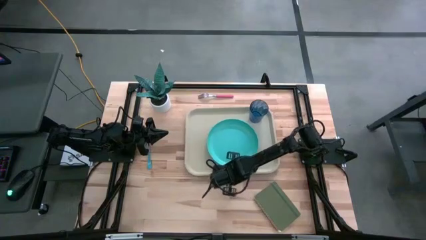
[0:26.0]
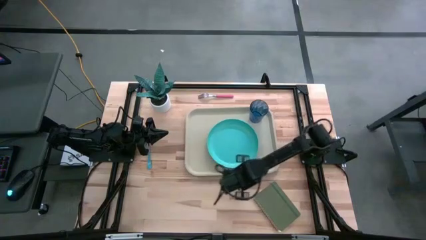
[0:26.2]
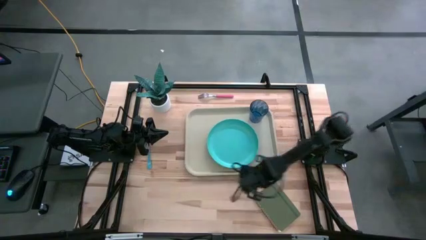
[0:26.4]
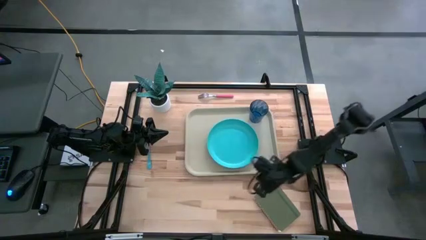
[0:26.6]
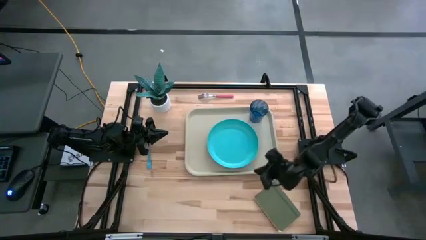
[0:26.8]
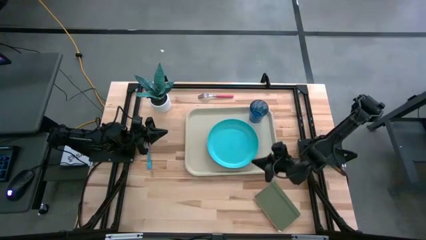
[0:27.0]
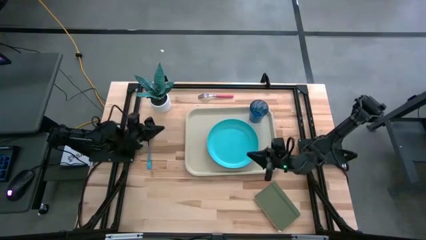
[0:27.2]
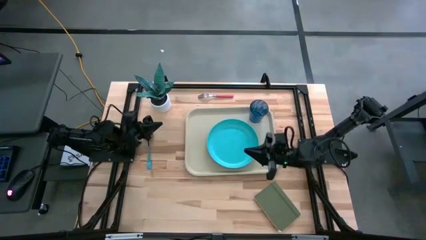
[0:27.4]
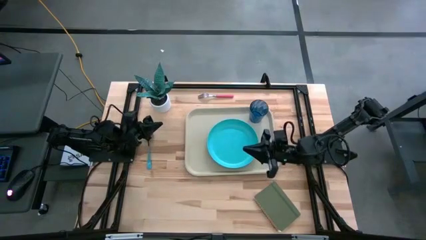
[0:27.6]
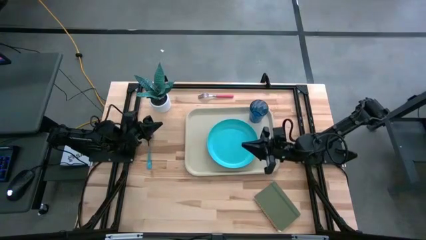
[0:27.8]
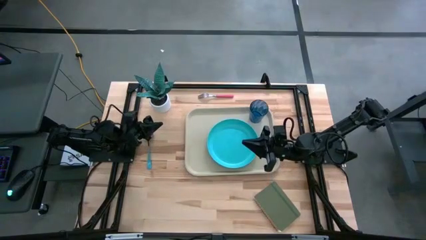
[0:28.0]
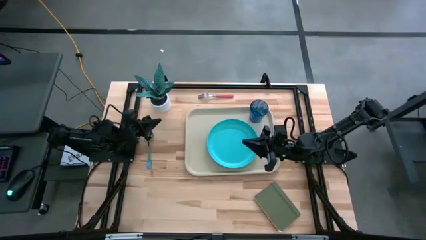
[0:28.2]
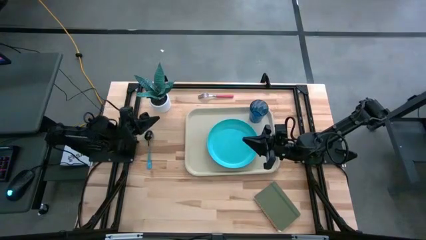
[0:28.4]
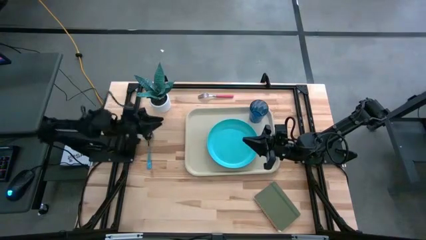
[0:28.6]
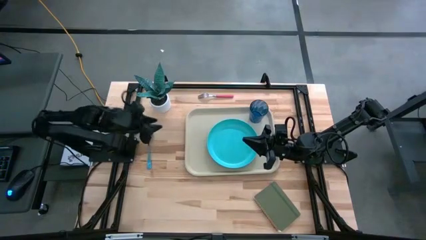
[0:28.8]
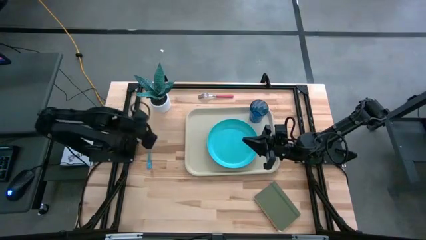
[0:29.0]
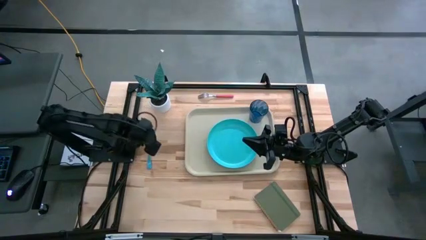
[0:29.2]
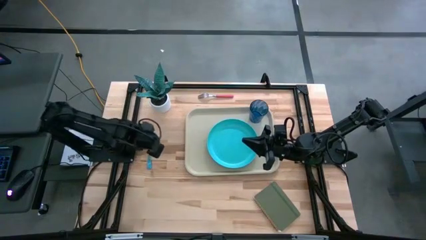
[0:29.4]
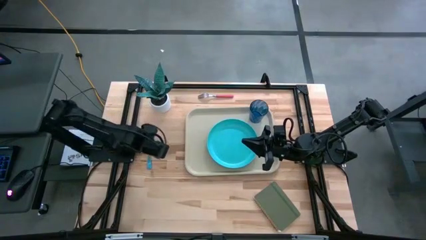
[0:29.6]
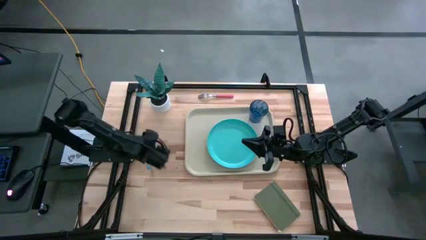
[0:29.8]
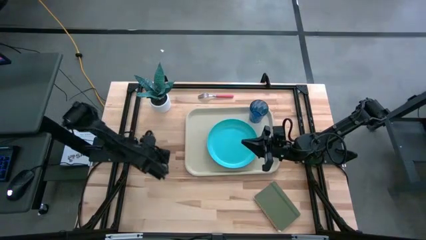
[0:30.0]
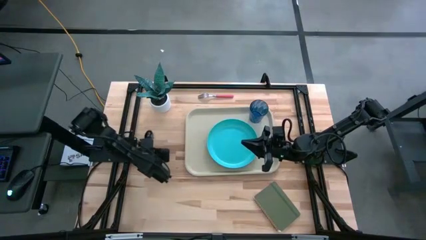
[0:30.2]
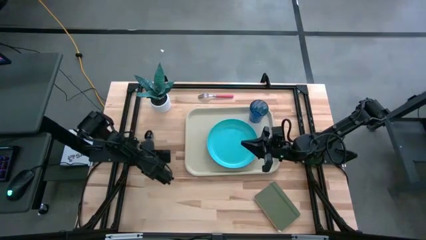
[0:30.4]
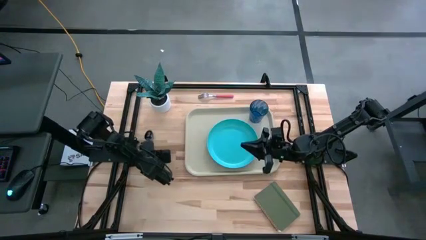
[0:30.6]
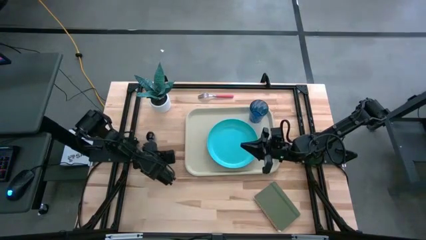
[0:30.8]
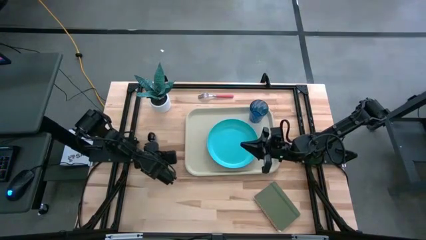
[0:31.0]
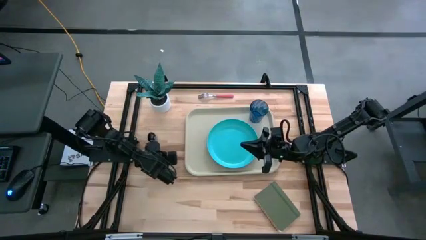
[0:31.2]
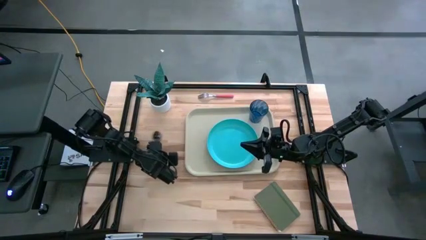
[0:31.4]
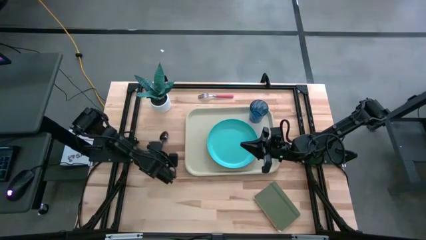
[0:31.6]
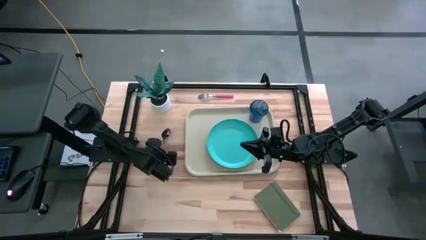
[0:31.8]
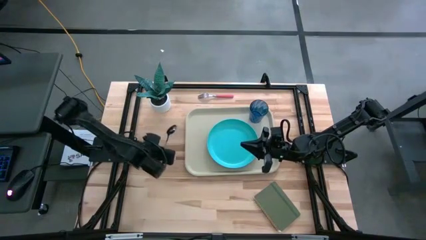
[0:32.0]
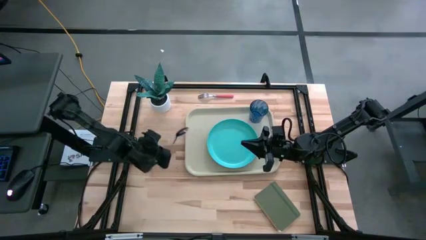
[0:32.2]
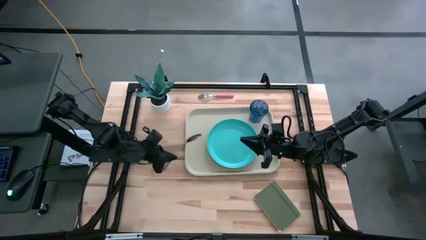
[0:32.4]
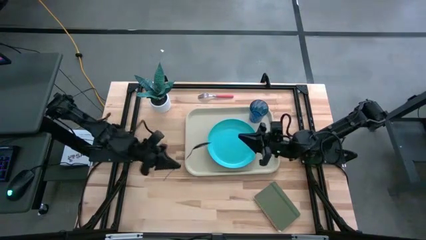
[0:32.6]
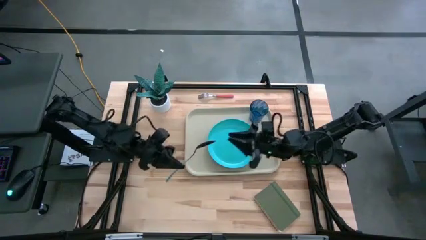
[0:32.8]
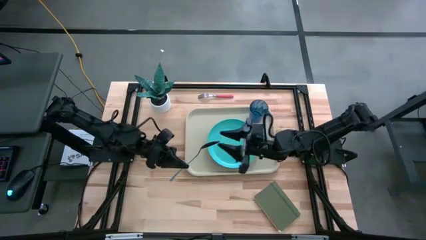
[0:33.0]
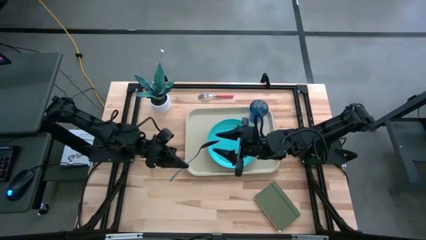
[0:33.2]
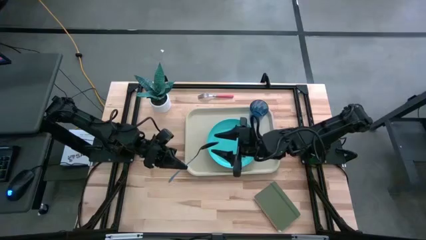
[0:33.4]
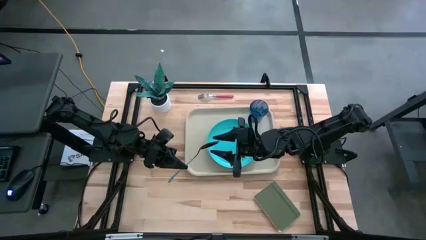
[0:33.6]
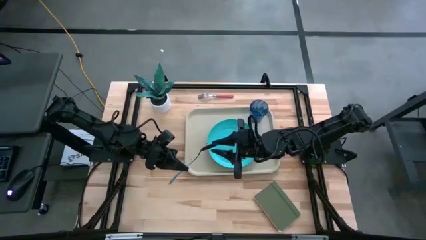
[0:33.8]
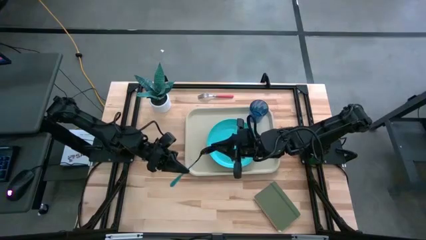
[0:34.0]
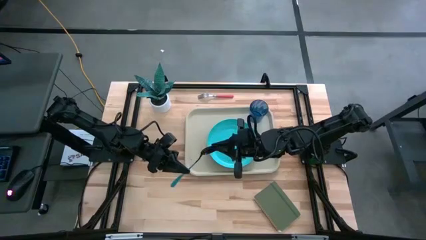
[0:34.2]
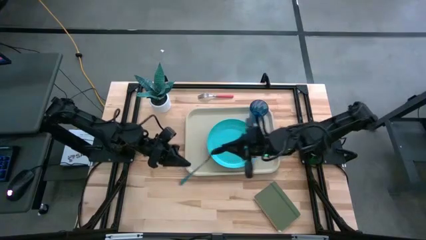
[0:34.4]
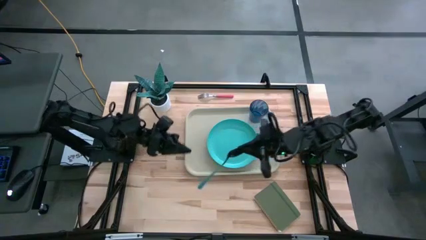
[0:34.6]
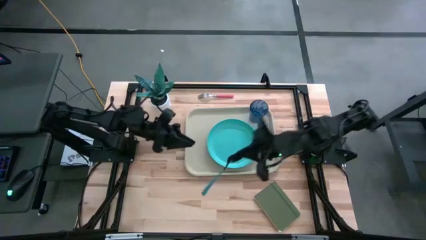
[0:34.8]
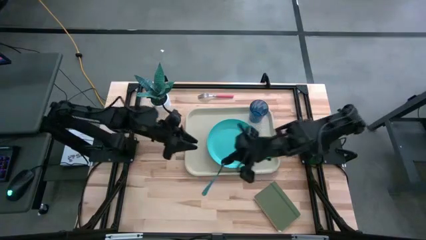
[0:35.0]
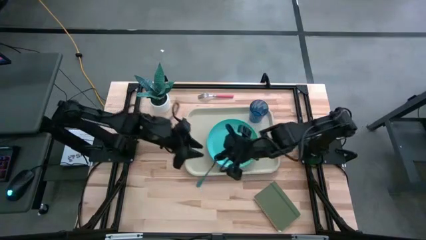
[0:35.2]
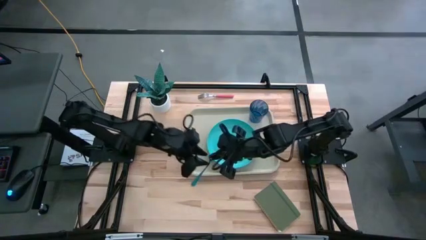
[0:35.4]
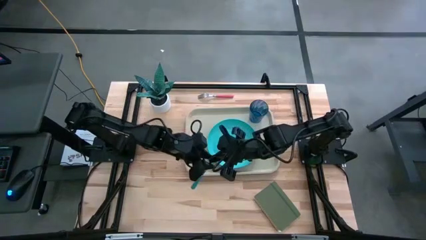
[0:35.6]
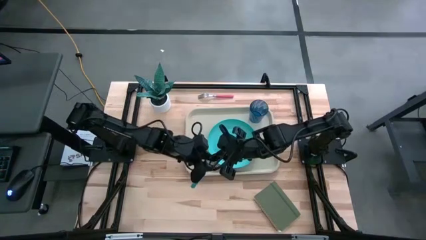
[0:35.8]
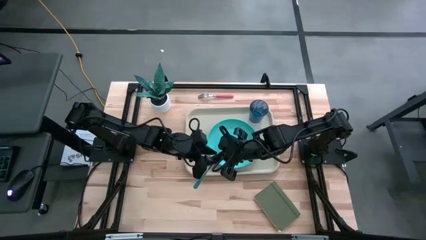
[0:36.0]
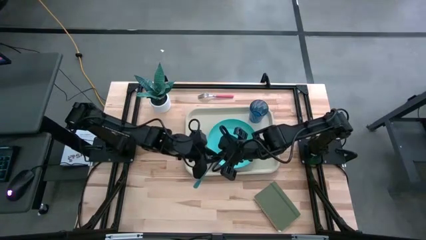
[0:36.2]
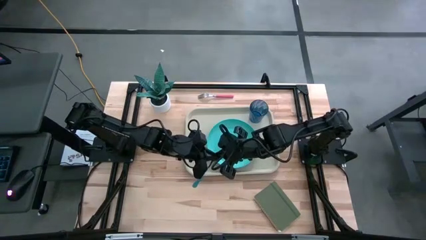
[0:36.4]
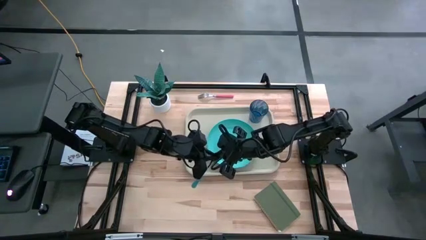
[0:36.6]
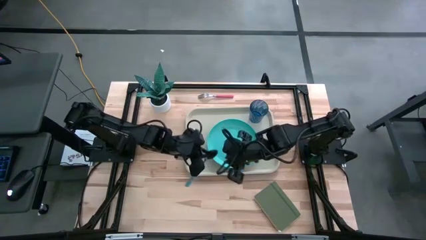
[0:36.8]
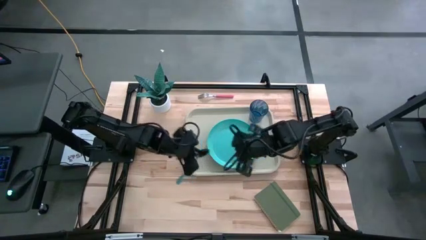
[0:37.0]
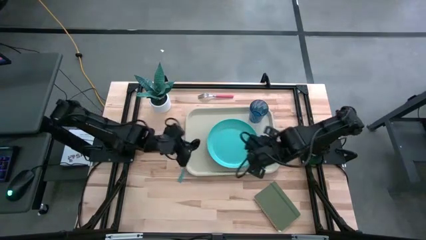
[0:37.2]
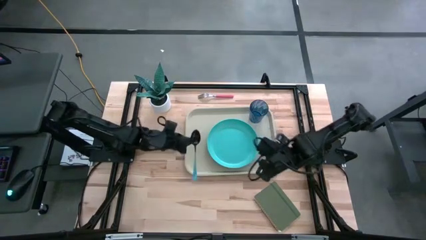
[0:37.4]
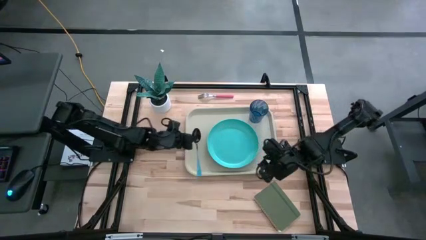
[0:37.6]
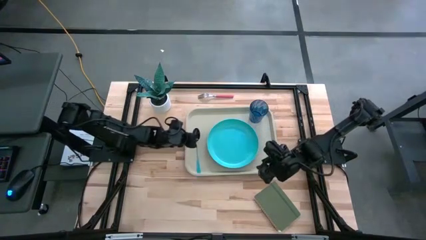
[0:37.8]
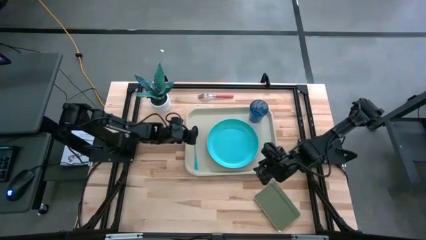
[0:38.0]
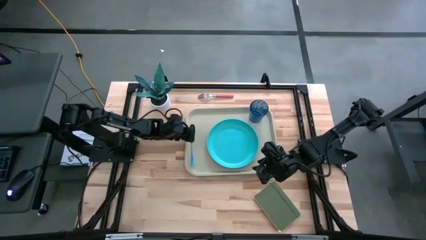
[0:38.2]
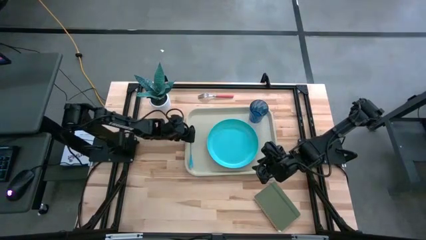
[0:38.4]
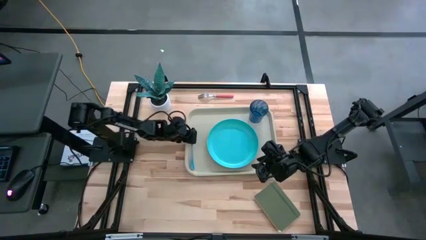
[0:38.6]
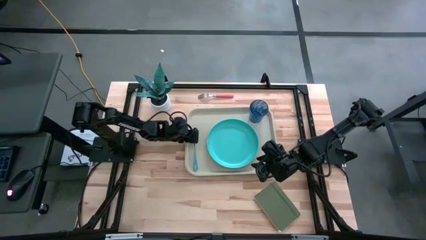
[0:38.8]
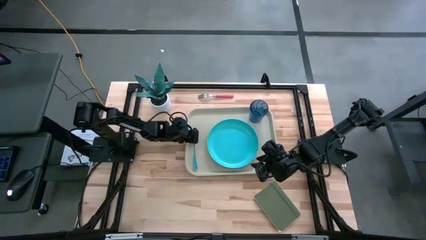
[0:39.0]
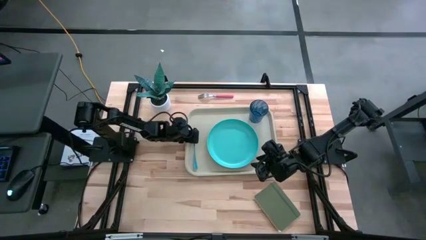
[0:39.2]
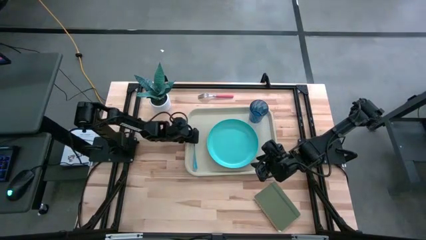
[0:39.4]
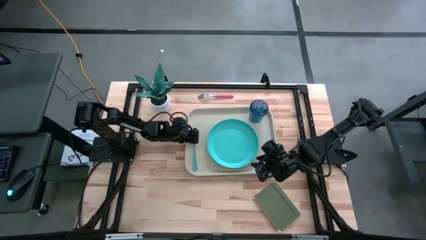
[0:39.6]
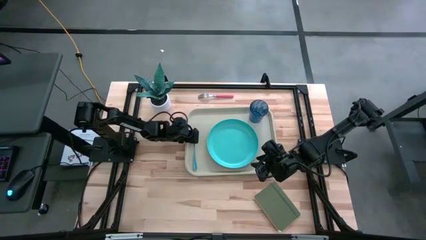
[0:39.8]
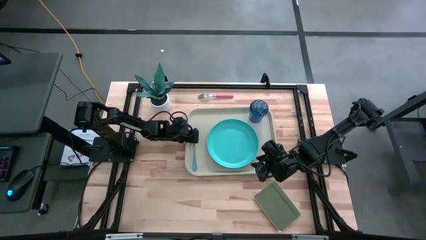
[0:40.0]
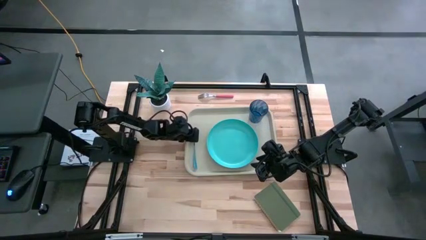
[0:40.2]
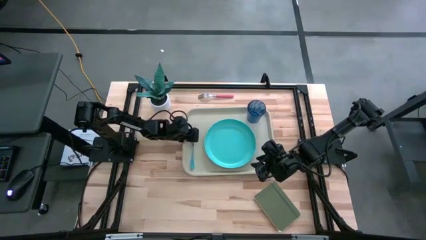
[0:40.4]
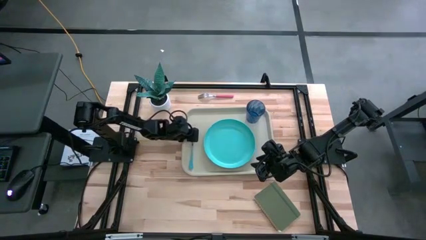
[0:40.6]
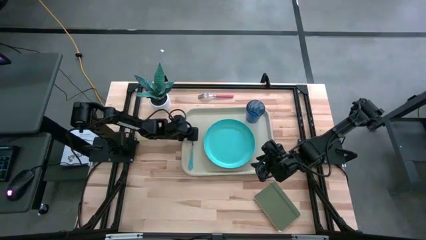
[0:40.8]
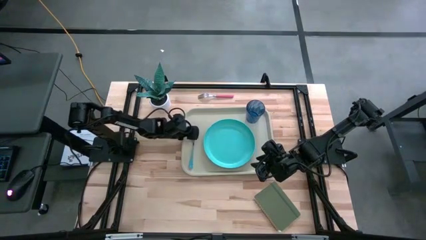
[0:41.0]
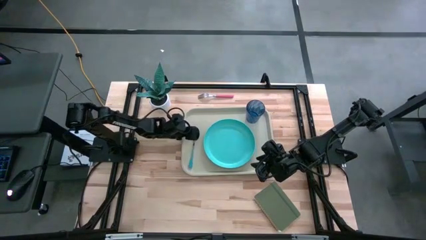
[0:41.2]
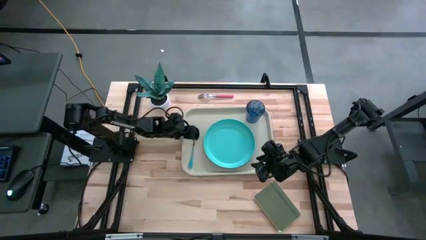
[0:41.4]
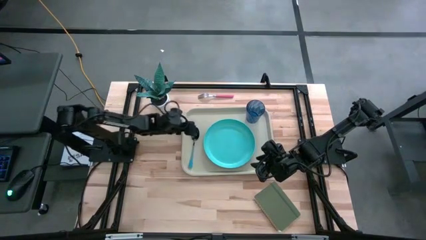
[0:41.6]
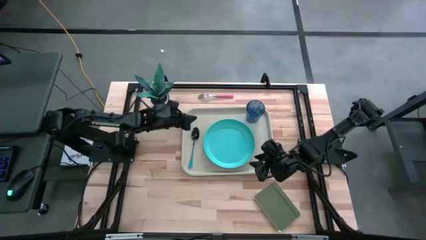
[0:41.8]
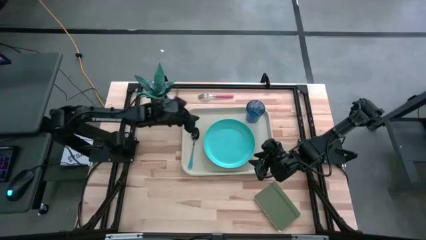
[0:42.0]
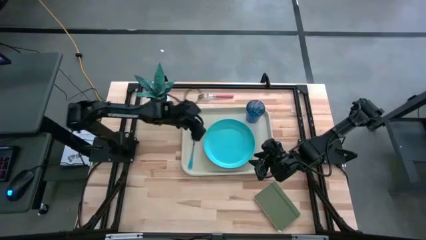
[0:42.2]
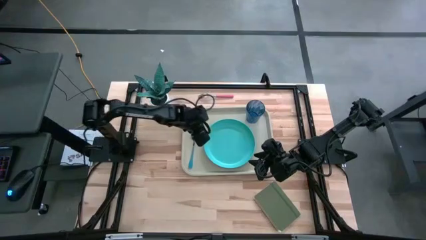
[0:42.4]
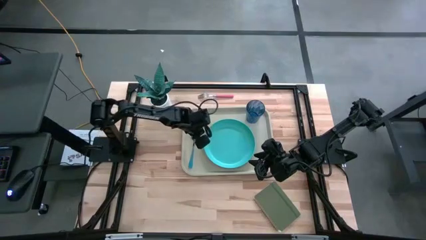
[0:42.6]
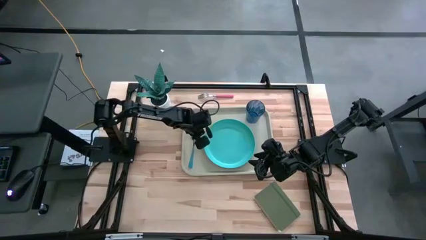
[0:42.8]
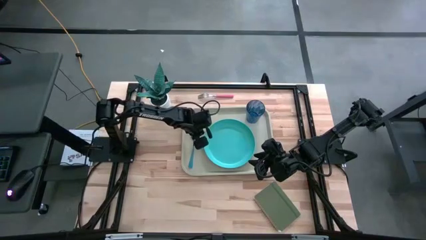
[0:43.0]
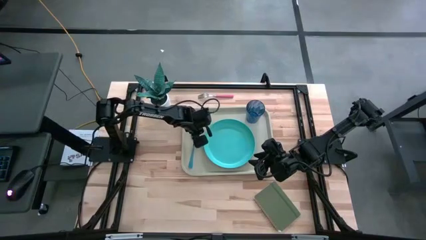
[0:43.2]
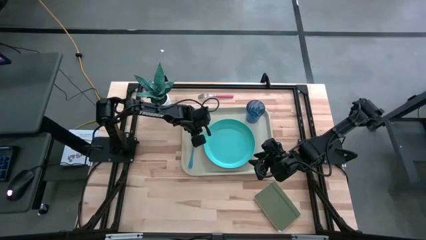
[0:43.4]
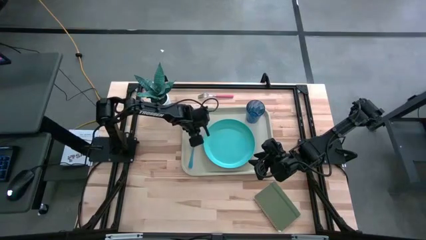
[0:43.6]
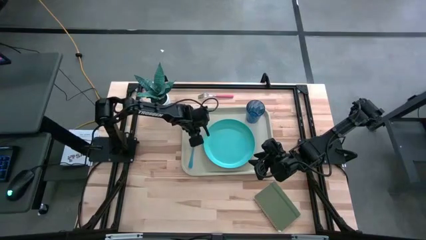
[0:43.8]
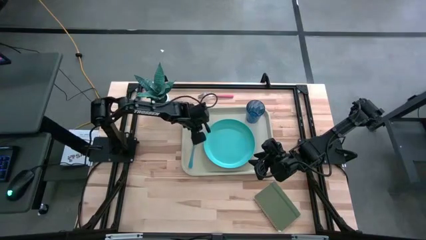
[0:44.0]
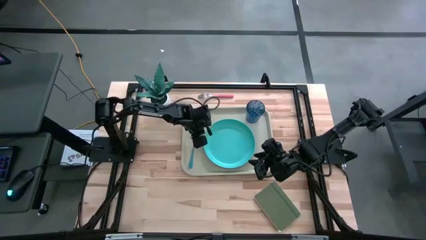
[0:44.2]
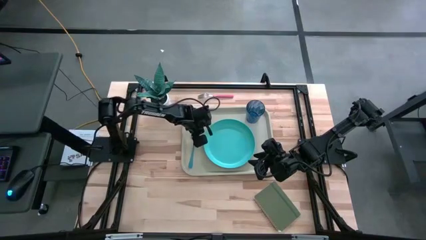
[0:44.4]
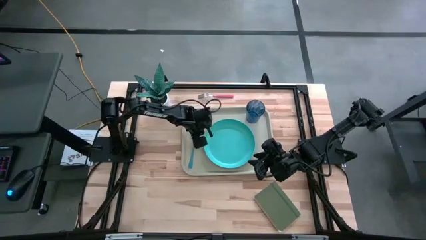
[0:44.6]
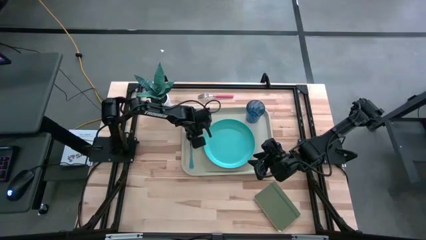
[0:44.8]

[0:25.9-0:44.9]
Task: Pick and place plate/cup/fork/spoon on tray
Put the blue spoon to the left side of the blue plate on the gray tray
